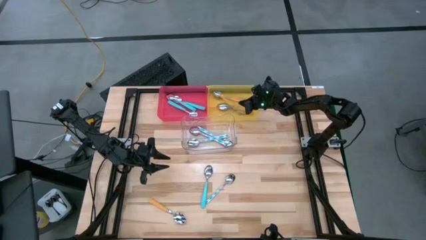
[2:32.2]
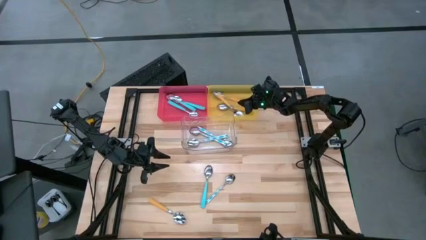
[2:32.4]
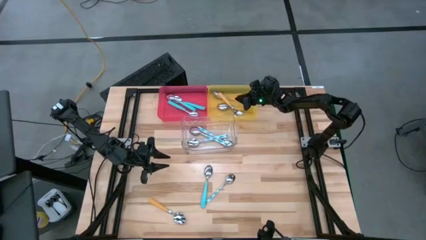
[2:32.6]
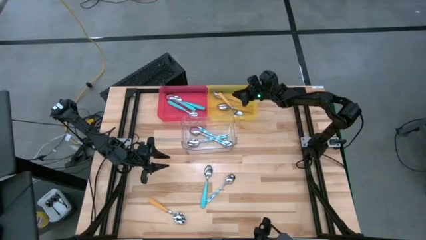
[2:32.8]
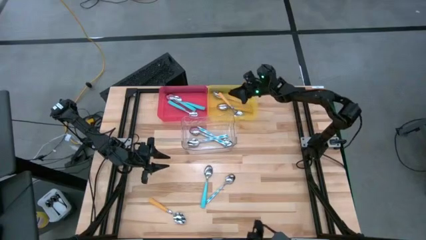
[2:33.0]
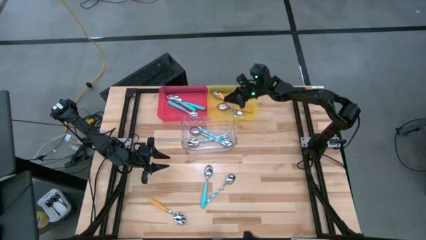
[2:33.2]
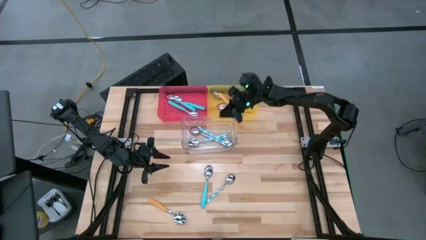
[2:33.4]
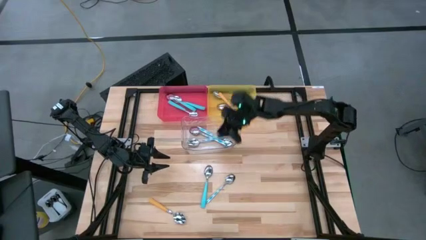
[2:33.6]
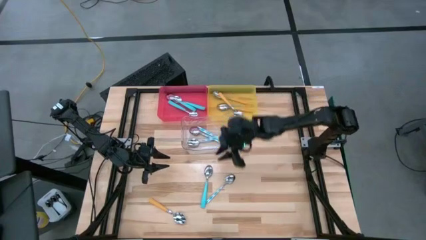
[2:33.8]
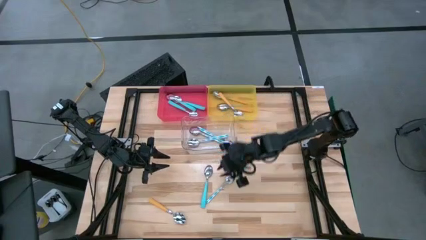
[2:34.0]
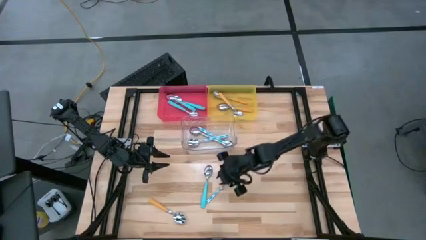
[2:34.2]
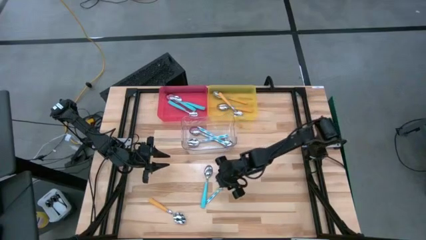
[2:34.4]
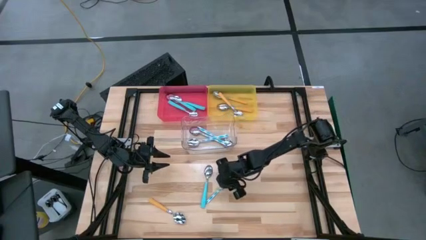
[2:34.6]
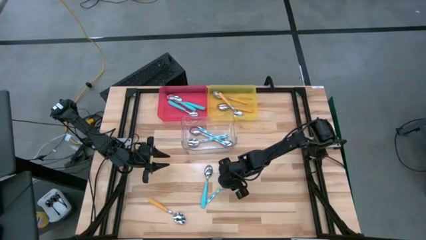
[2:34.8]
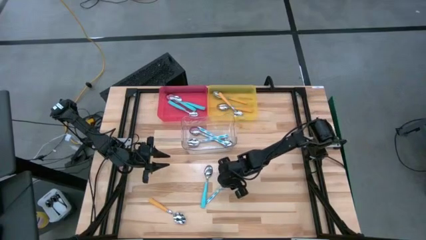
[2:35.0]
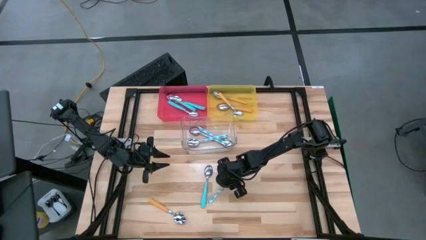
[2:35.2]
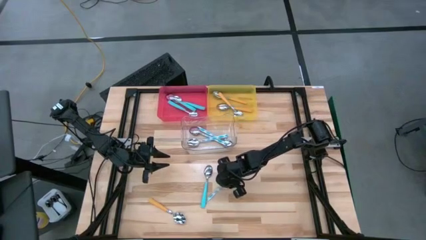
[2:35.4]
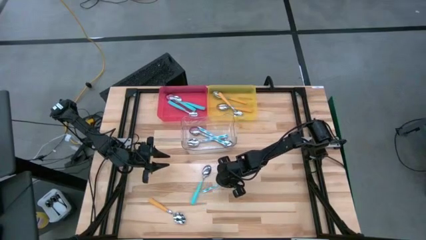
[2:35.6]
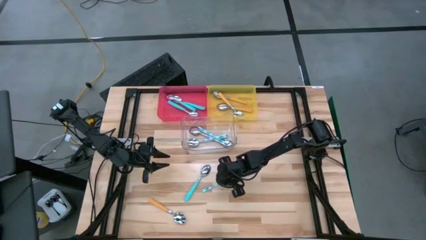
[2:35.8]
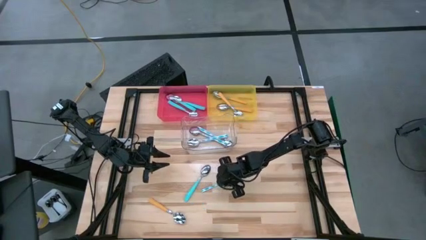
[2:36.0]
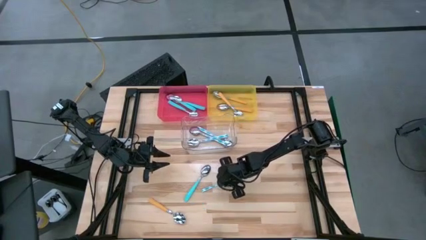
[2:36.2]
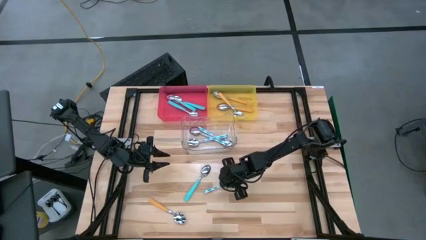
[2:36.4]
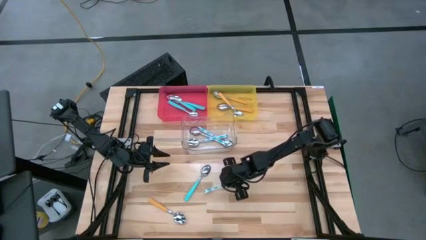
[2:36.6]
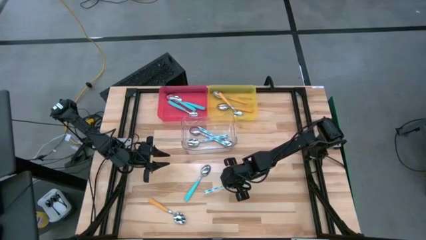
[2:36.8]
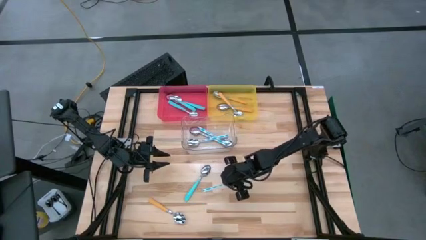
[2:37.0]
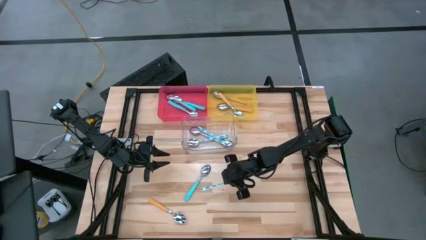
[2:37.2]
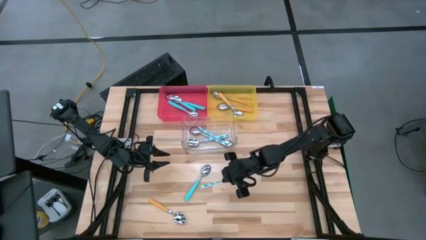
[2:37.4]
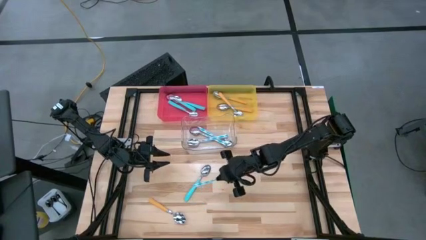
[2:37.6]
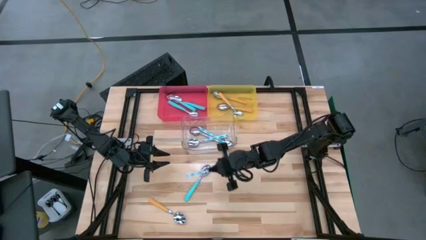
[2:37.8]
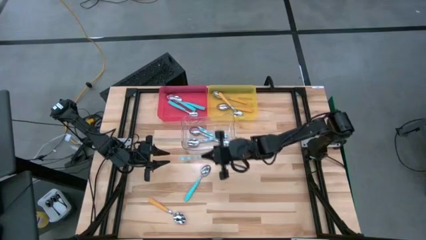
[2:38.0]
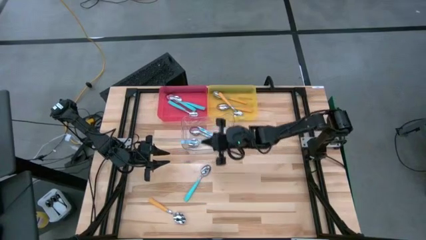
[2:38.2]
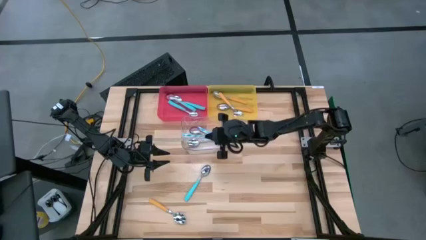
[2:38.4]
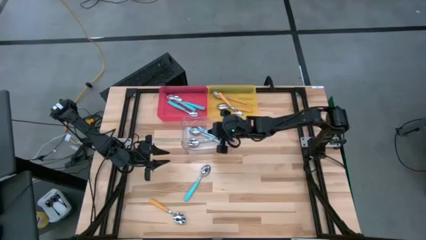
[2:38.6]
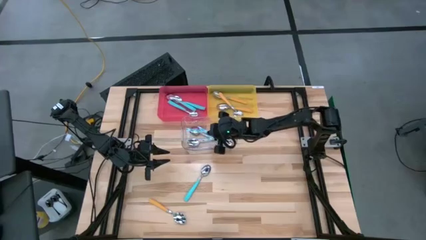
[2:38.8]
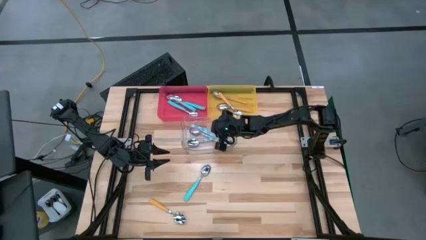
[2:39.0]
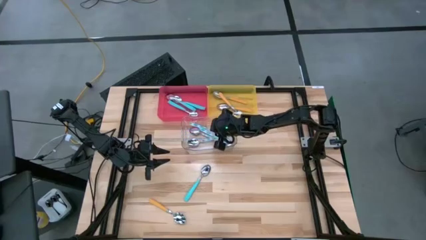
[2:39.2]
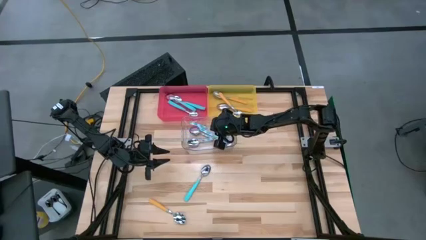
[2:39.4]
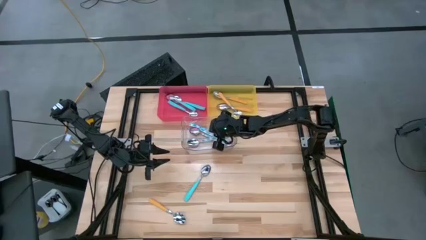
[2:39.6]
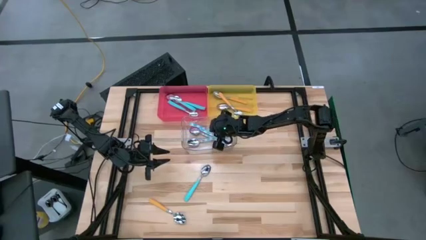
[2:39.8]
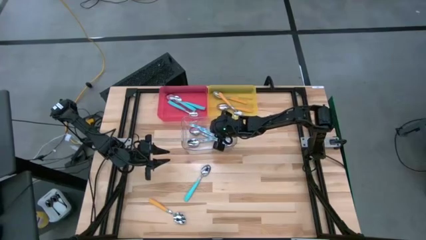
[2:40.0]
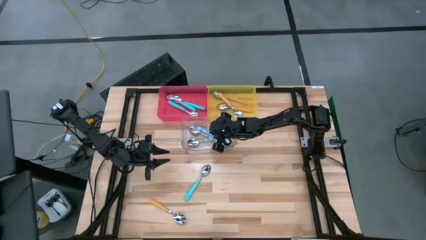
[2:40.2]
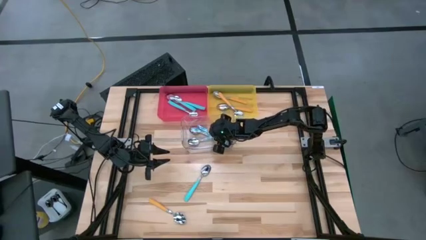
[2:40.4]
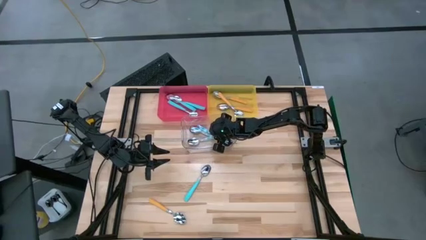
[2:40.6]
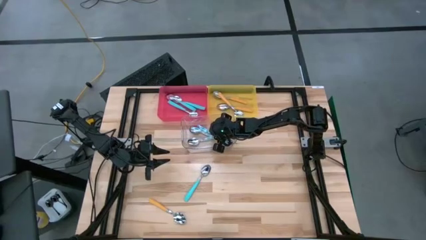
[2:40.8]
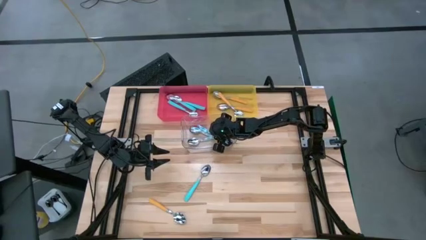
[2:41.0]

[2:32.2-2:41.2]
Task: Sort silverware by color (type)
Put the green patterned spoon into the transparent bin

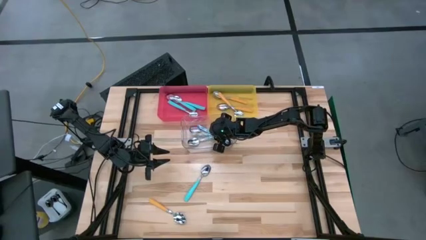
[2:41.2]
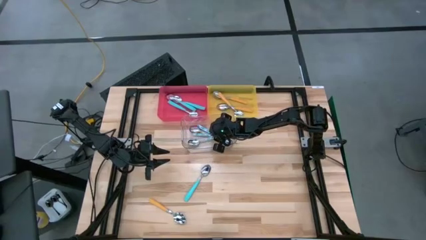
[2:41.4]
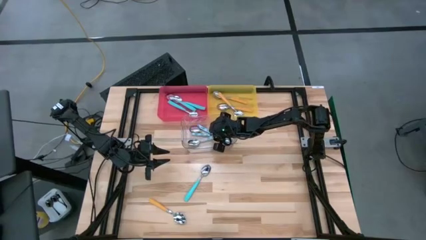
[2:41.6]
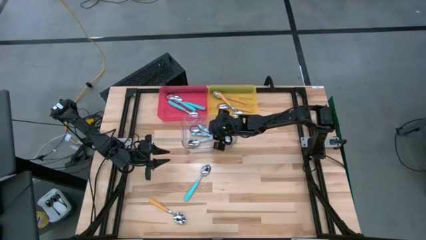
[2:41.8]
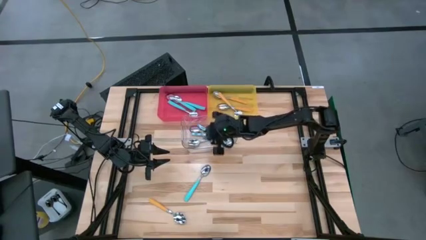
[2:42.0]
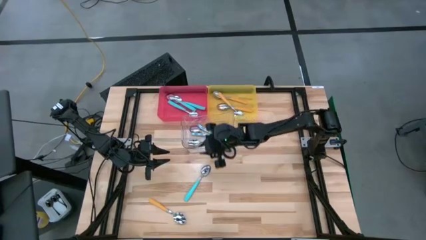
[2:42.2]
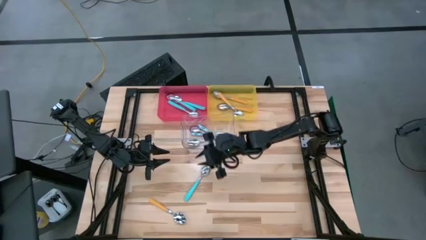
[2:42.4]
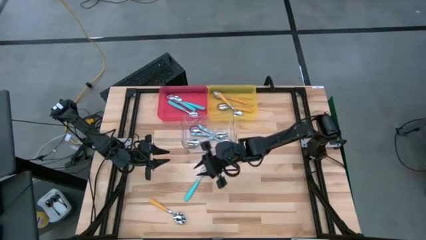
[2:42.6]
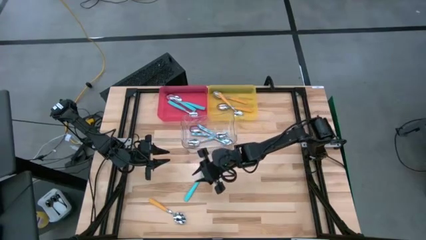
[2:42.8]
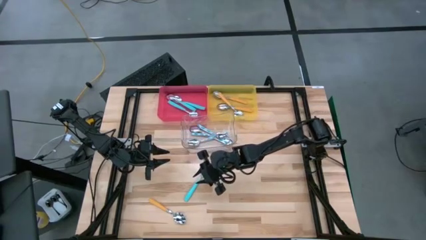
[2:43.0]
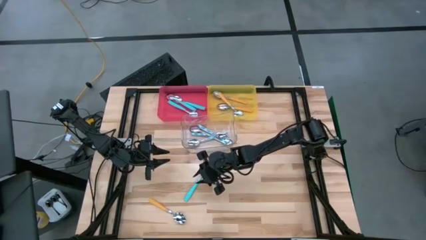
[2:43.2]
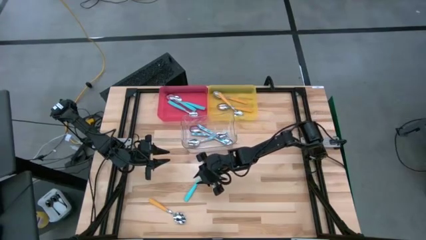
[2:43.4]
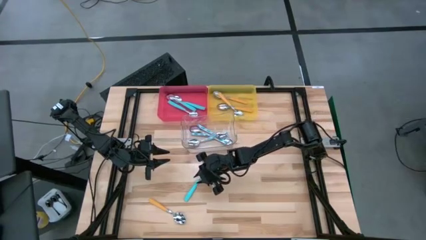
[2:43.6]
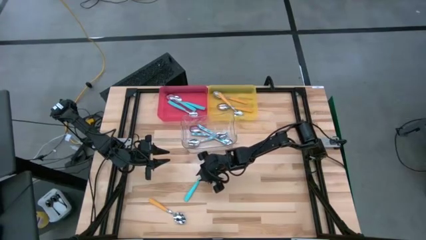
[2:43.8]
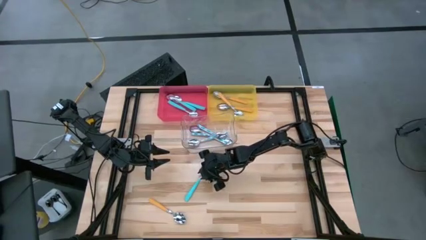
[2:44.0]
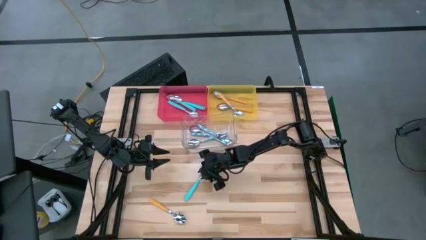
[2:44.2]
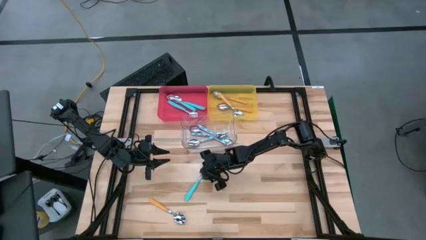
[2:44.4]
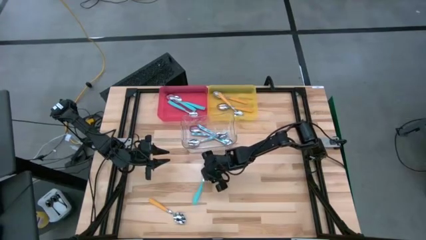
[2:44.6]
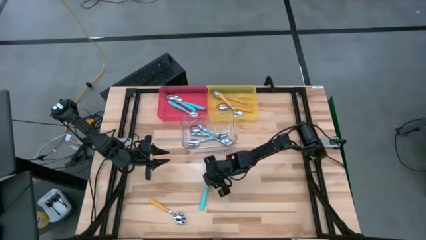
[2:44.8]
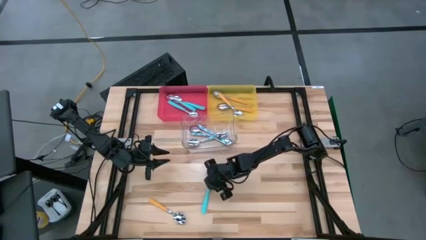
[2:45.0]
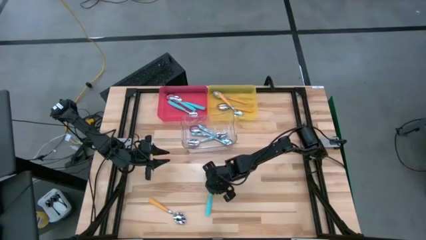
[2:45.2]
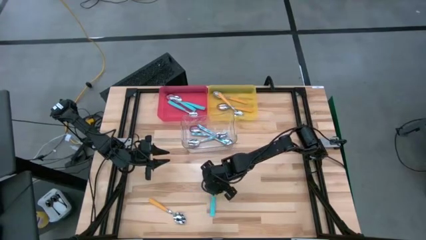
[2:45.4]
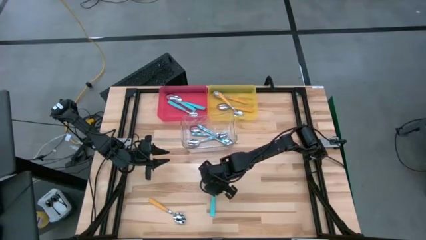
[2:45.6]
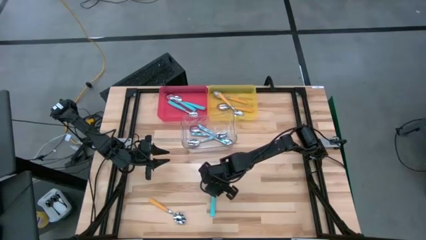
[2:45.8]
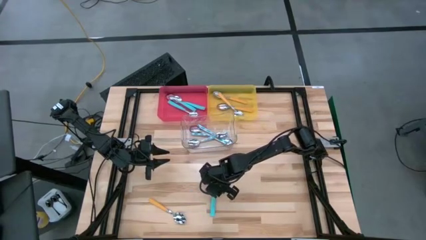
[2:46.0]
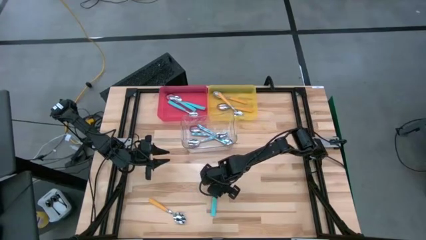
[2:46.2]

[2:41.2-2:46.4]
Put the light green spoon into the red bin
